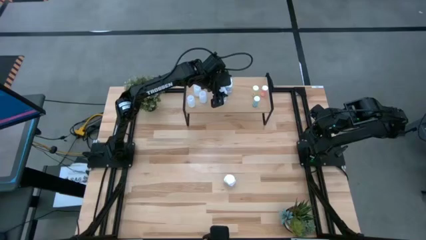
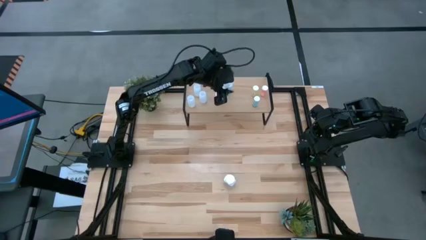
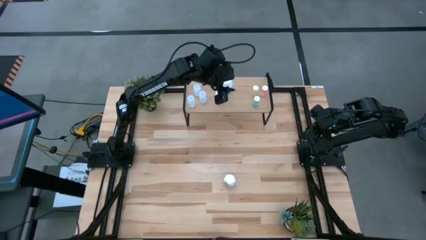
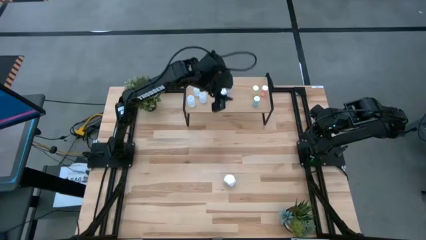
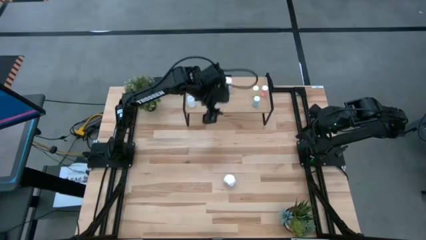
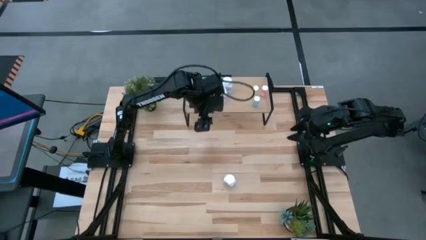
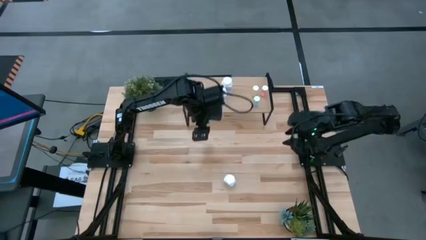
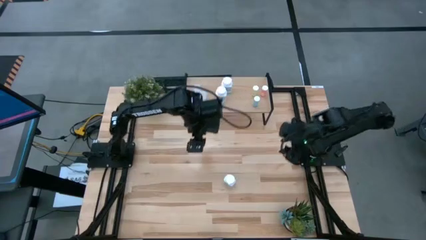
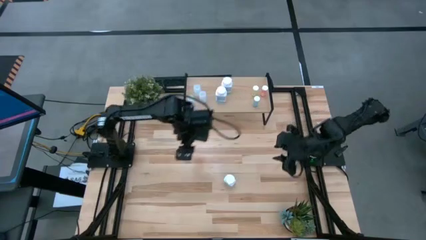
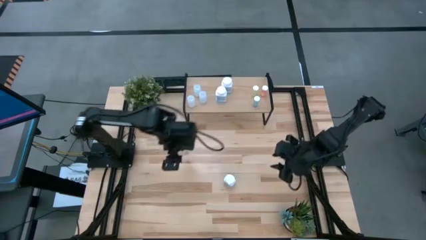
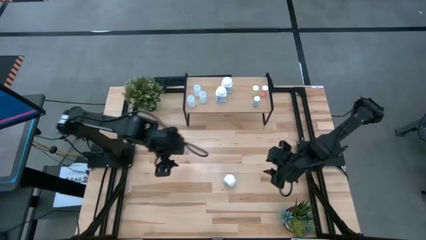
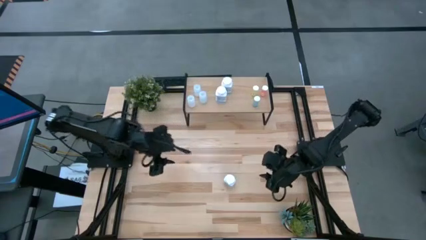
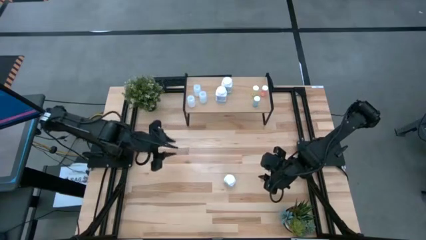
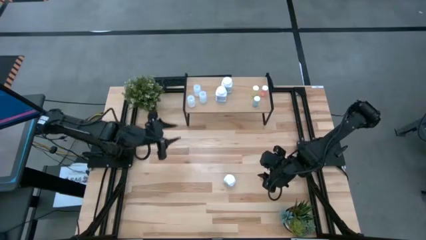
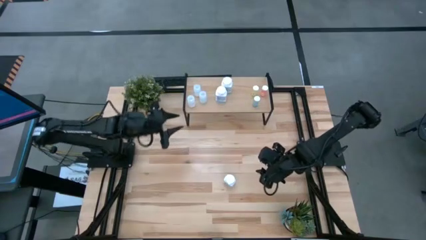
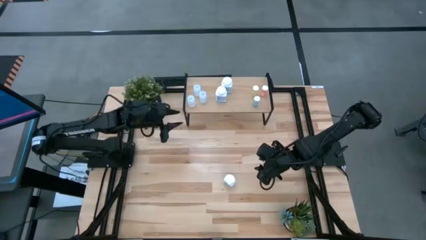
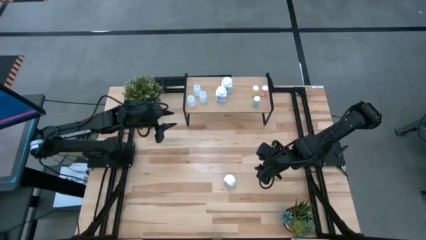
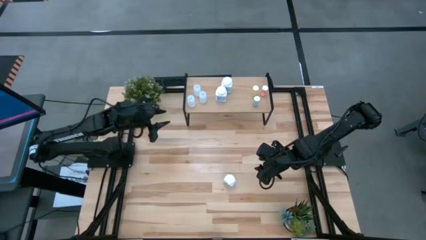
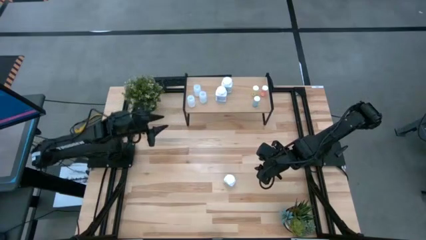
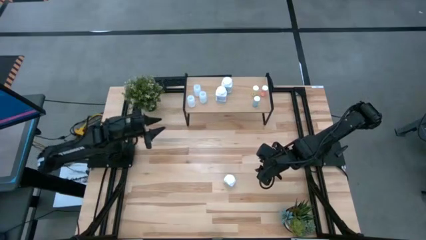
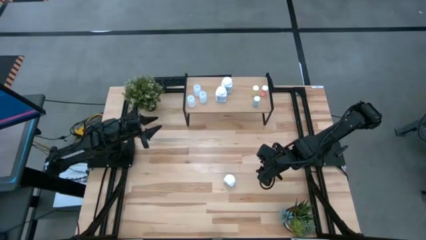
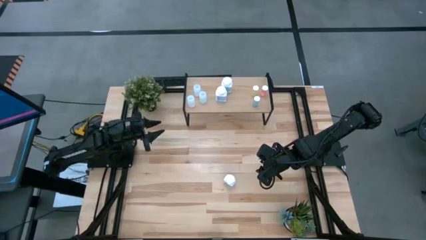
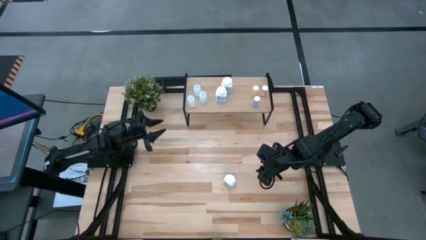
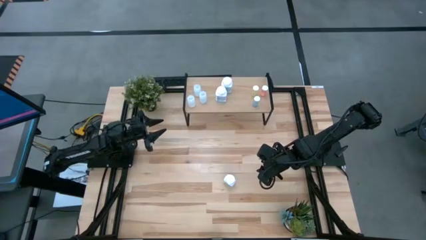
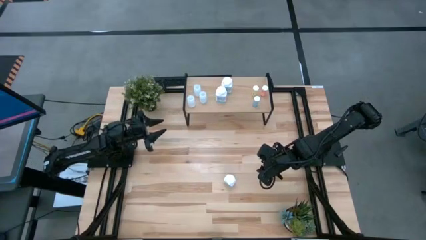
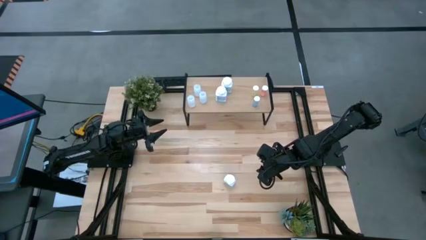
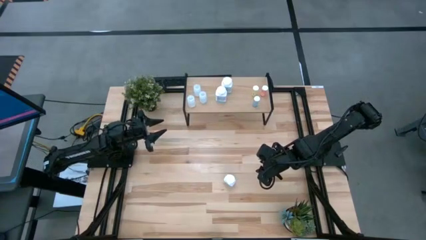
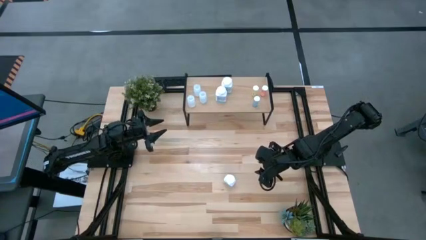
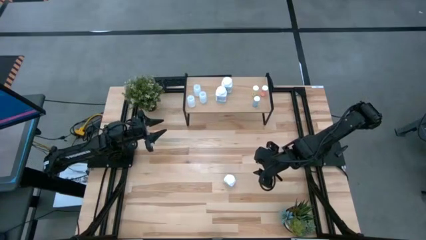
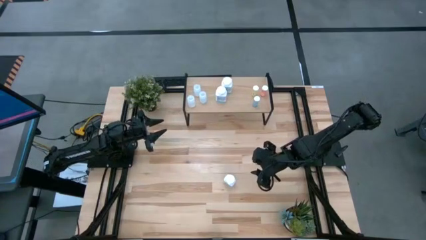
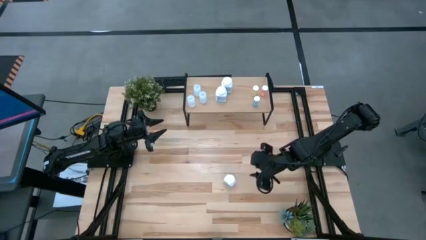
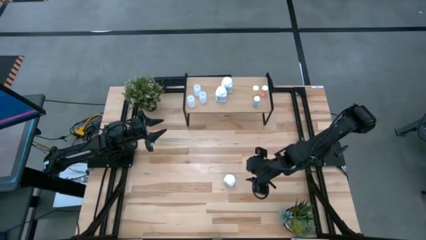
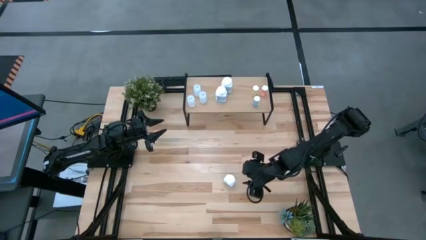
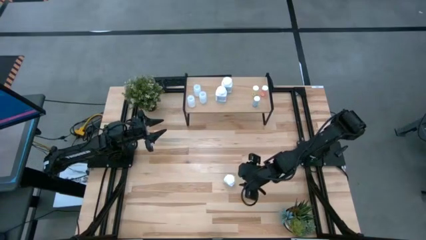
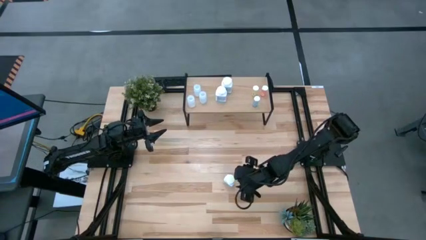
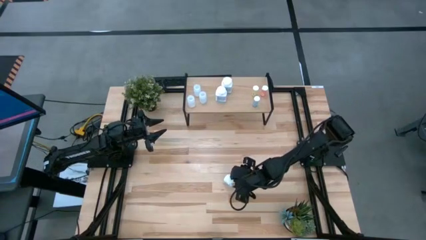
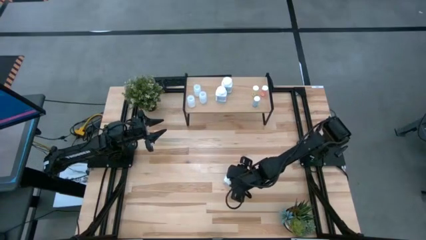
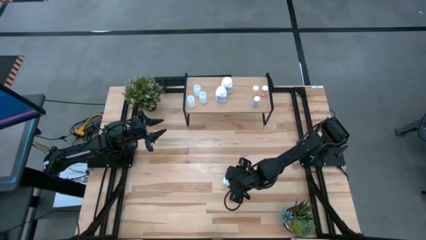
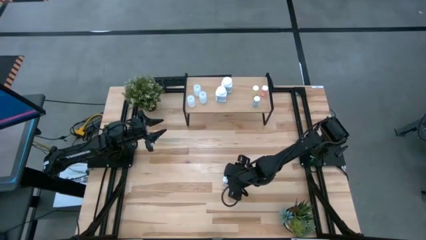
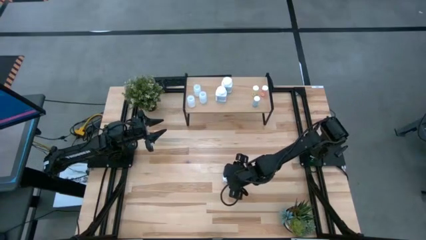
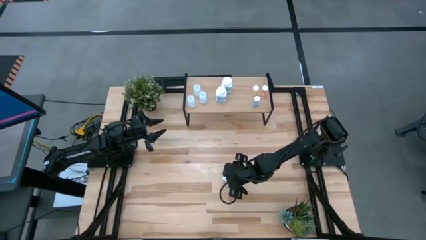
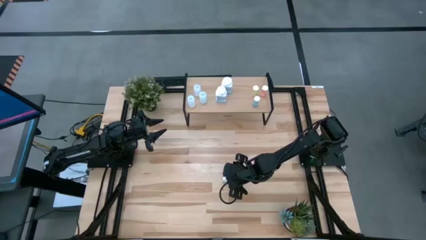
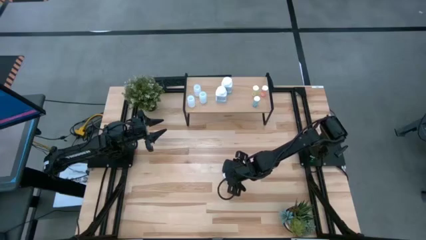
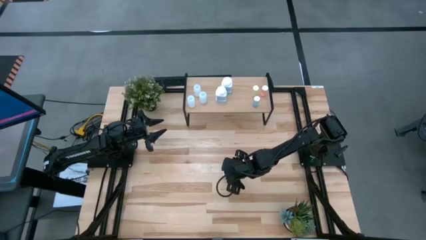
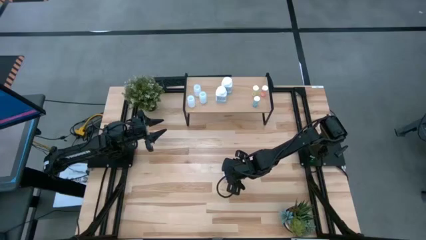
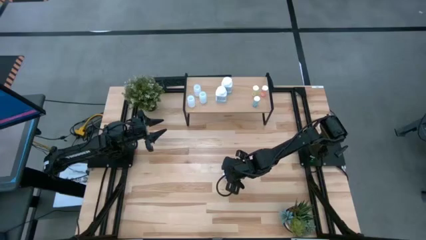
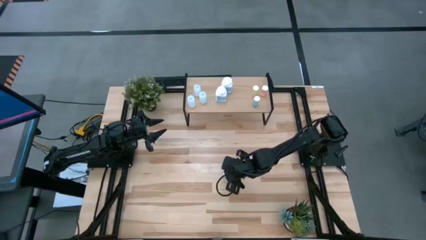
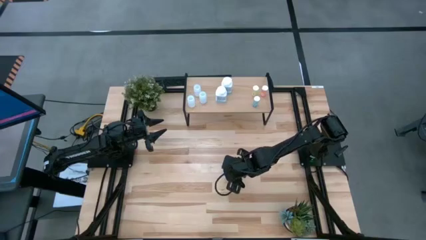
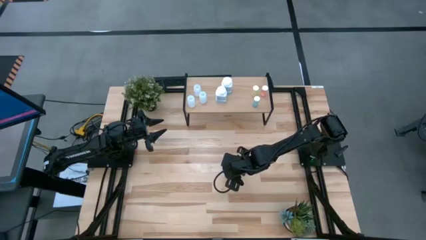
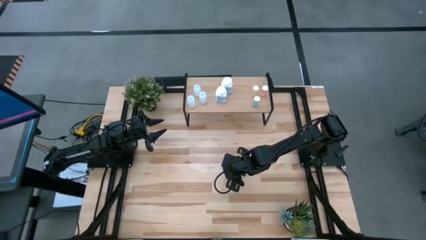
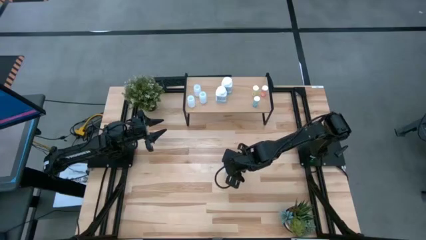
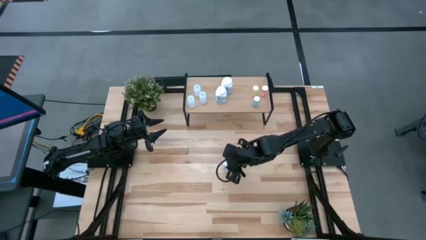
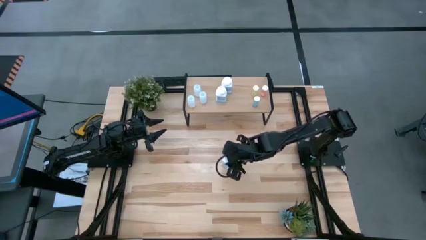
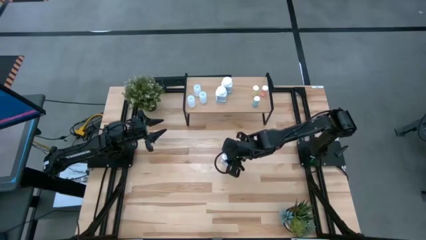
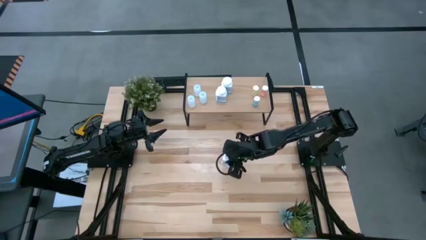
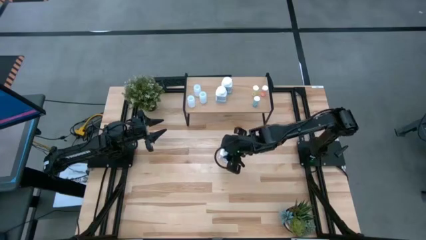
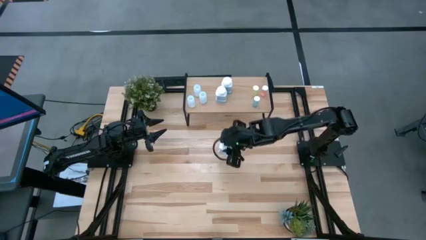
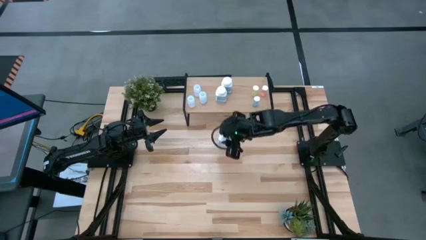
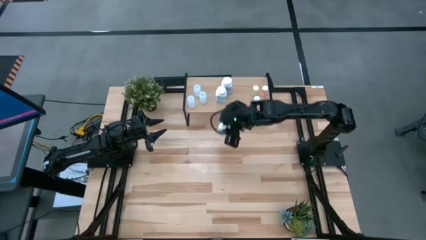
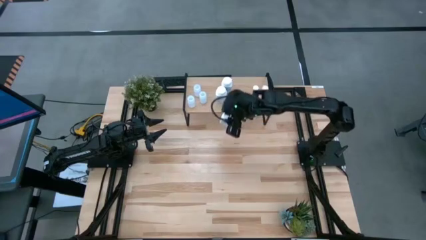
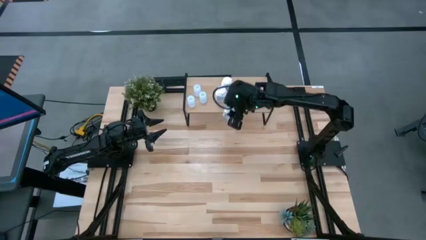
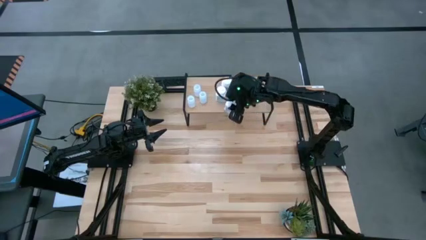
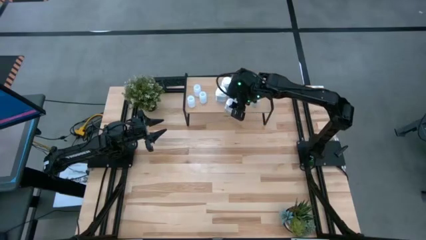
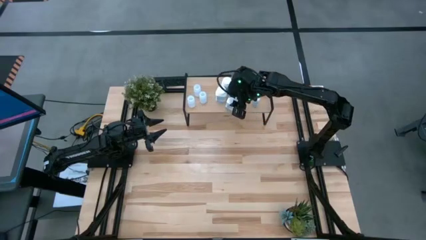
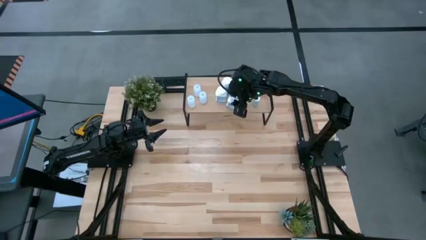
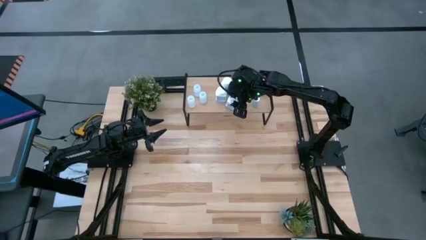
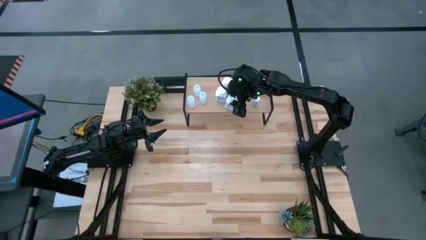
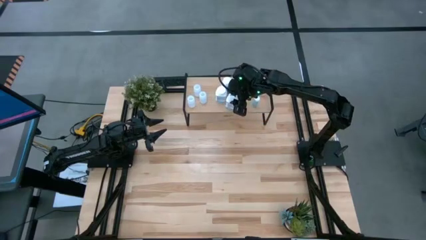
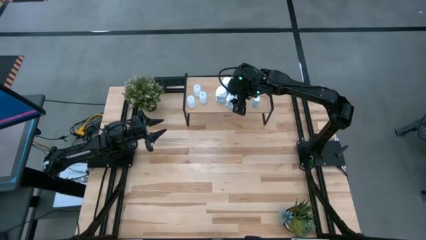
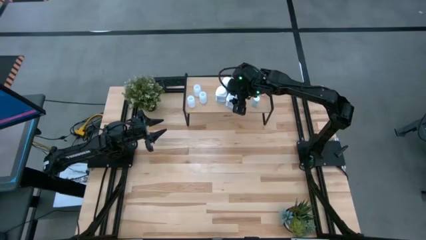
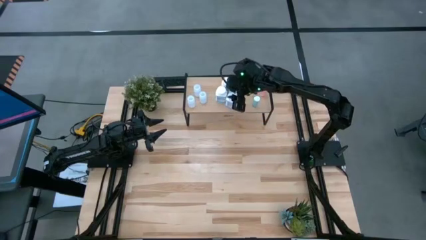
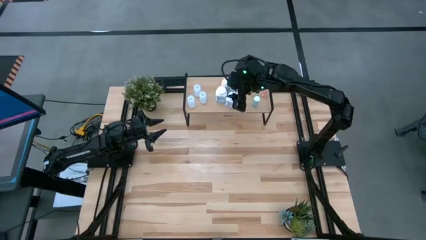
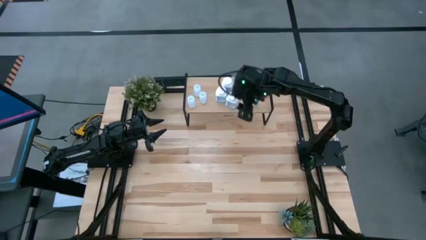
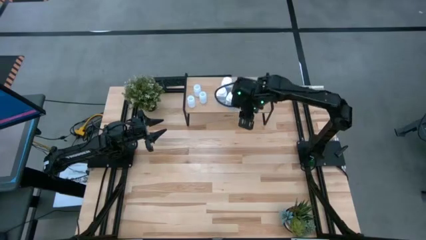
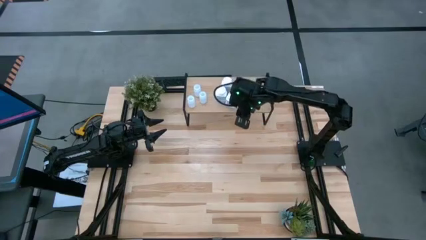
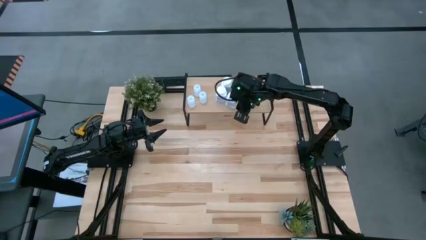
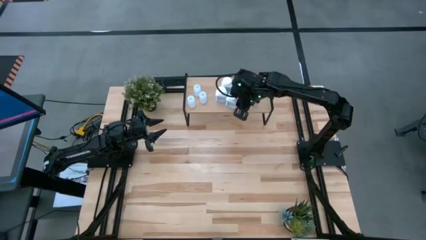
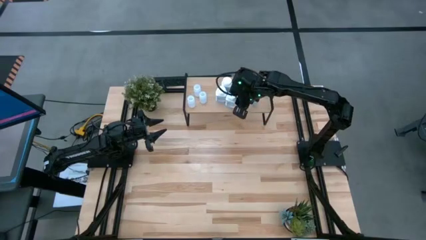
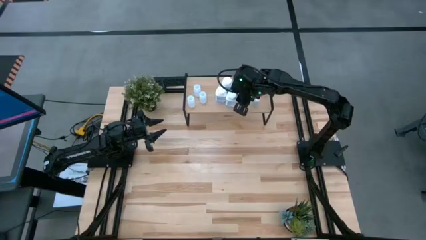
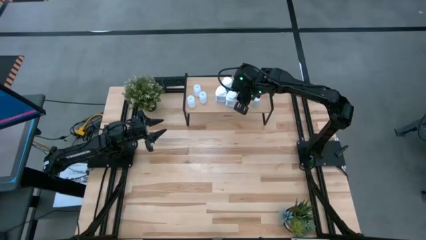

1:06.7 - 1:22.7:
Task: Pick and place medicine bottles onto shelf by color
Put the white pill bottle on the shelf
